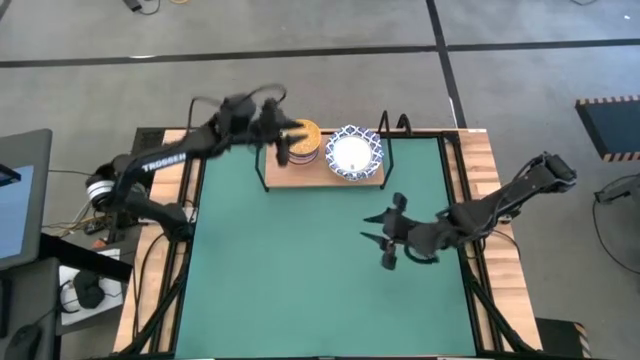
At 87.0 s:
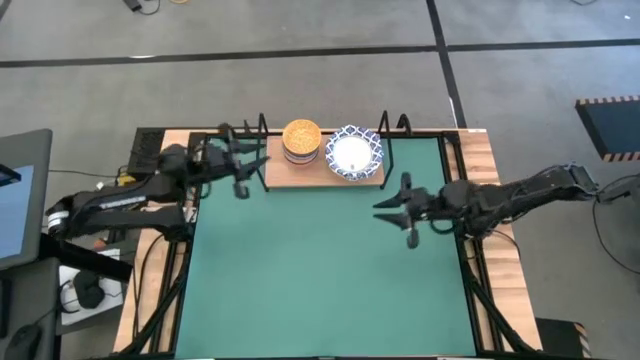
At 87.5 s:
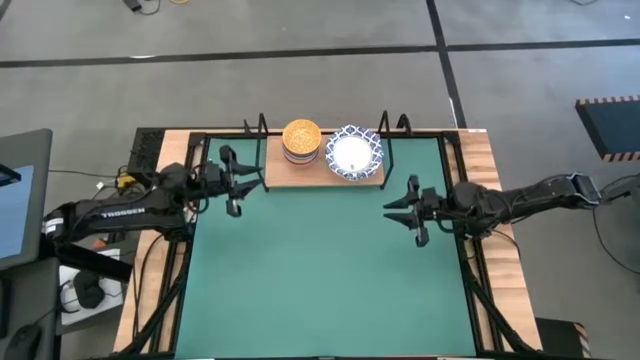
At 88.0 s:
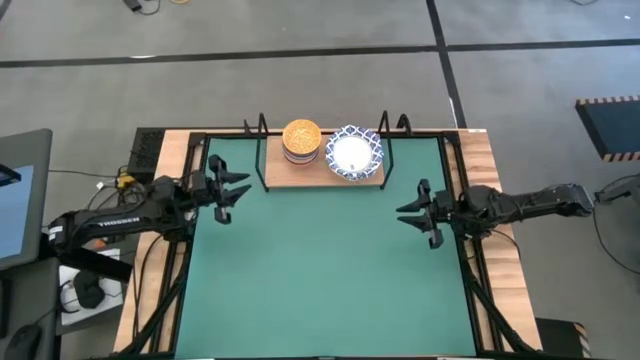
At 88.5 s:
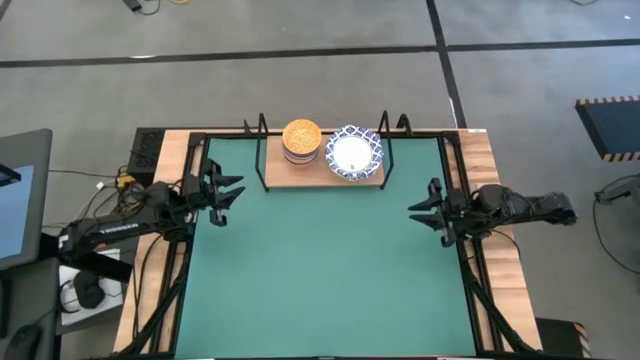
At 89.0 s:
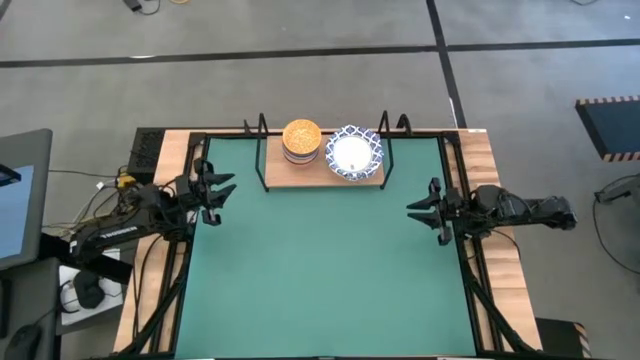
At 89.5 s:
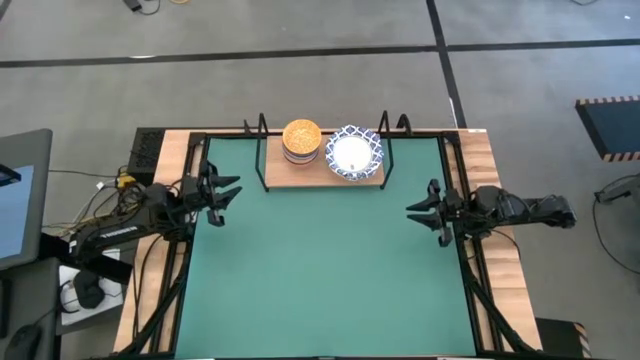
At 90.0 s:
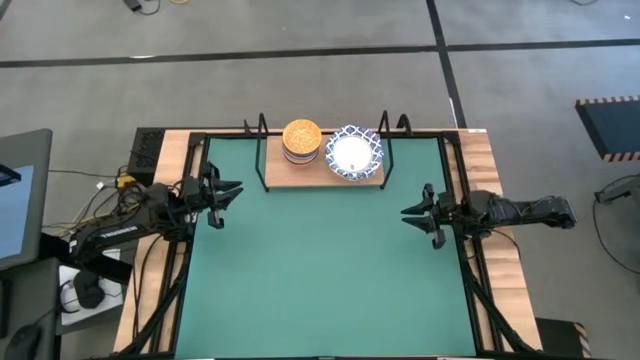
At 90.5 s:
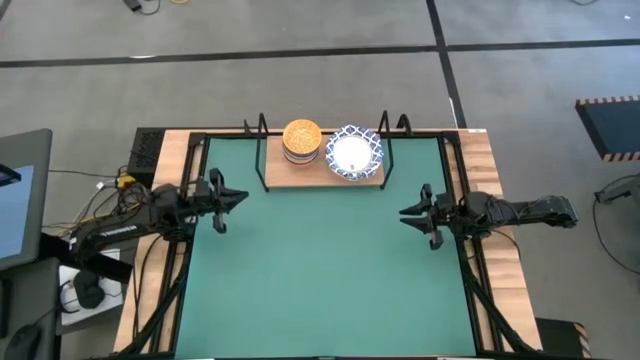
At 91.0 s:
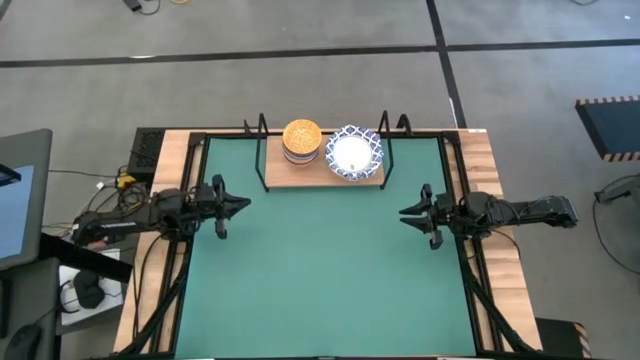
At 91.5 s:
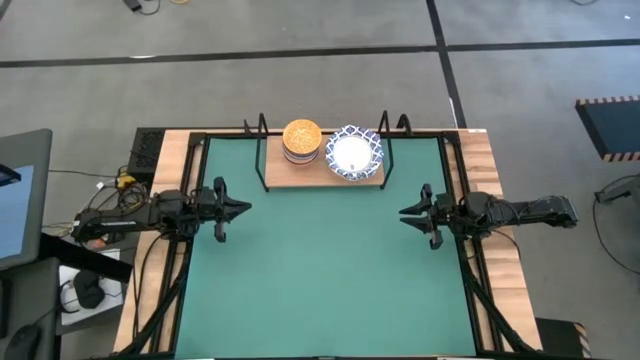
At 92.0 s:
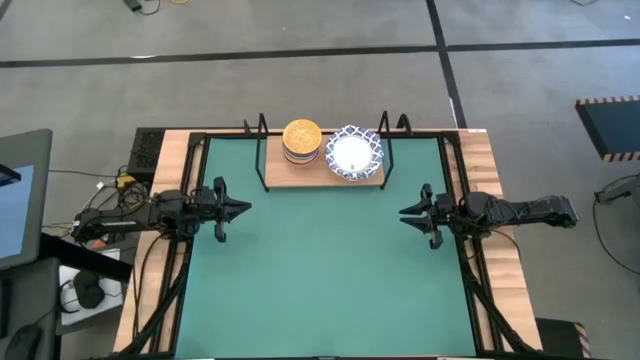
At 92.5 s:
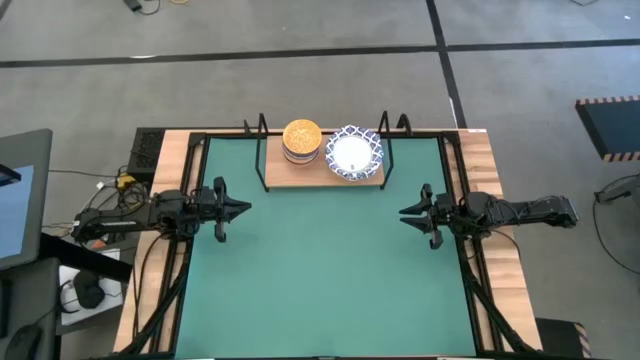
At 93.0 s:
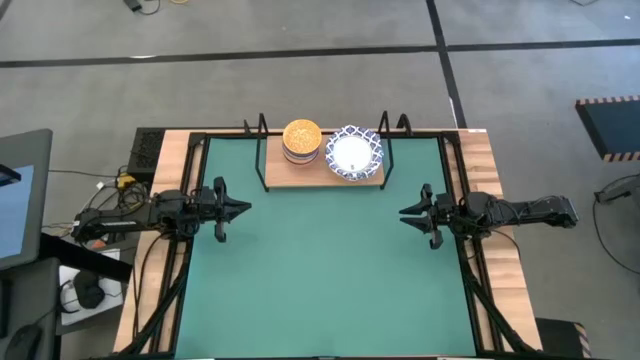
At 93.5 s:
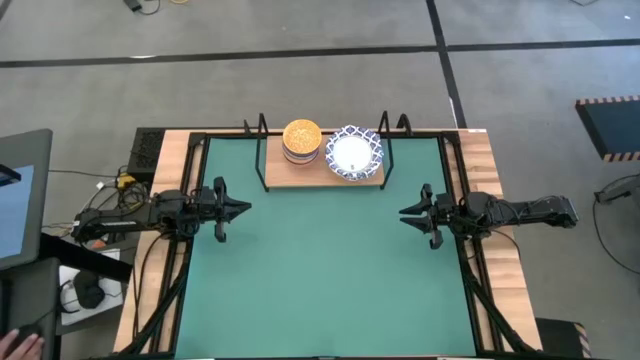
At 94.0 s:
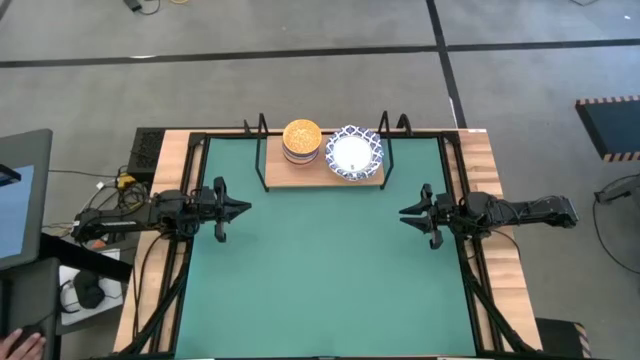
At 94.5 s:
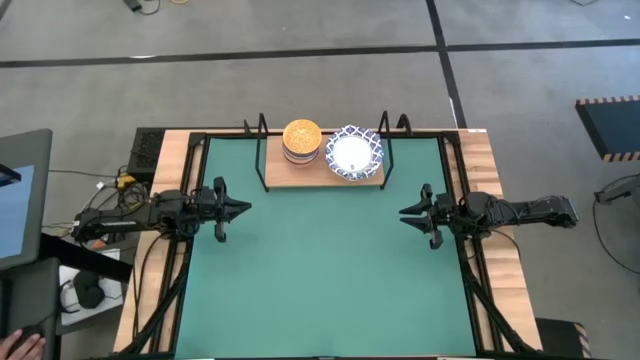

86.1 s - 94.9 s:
Task: Place and stack bowls onto a shelf
Return to Home Position

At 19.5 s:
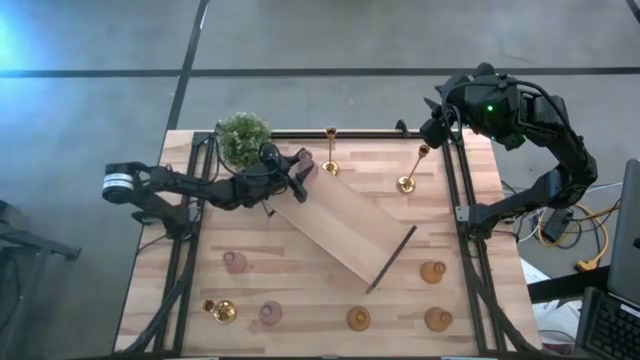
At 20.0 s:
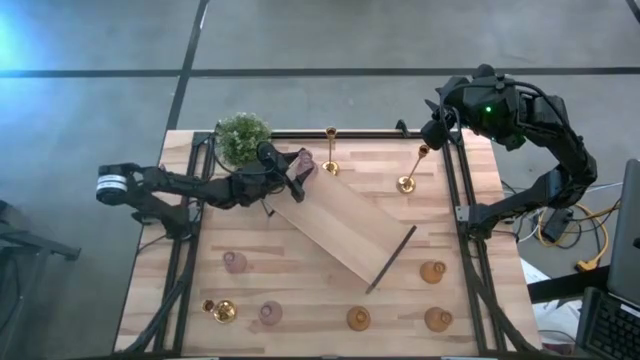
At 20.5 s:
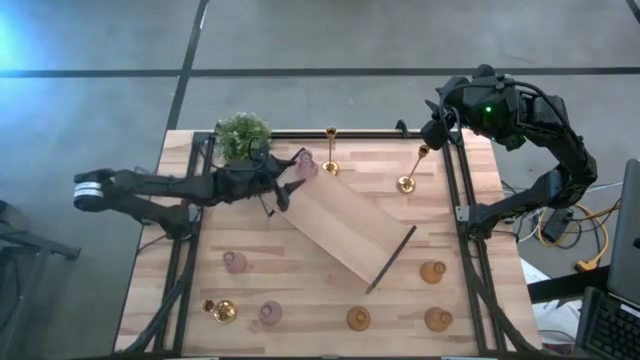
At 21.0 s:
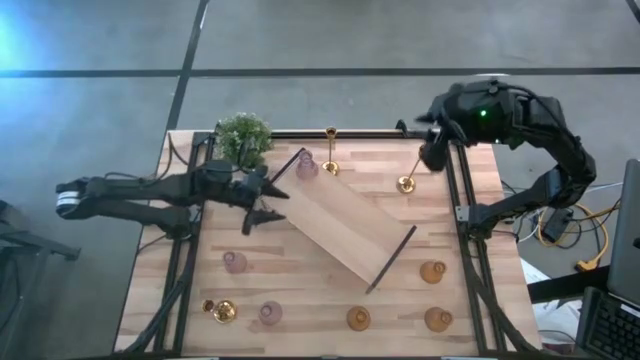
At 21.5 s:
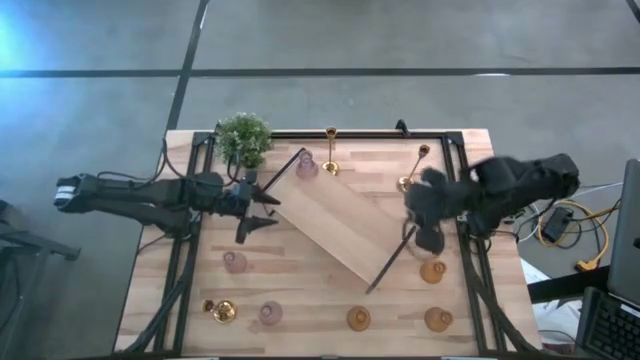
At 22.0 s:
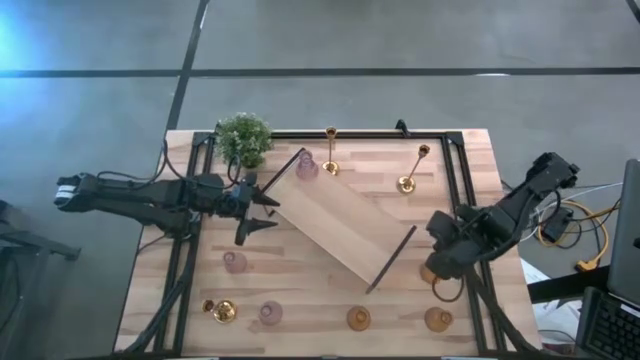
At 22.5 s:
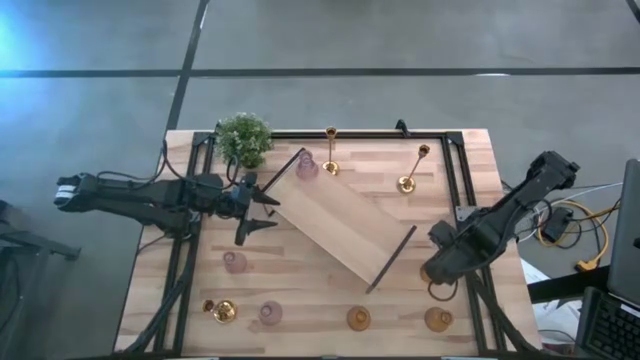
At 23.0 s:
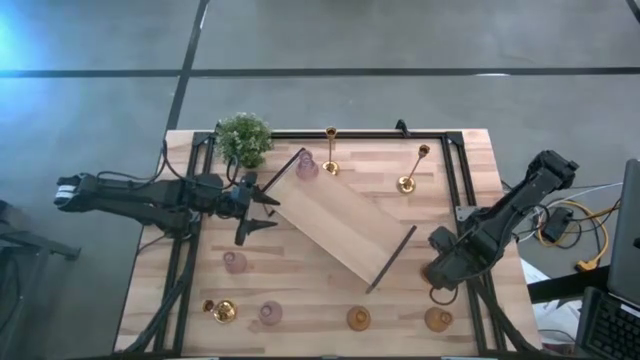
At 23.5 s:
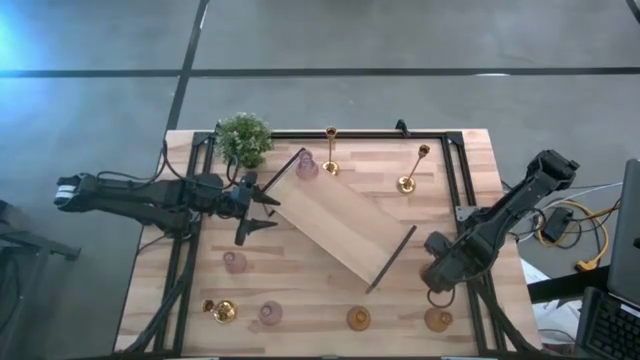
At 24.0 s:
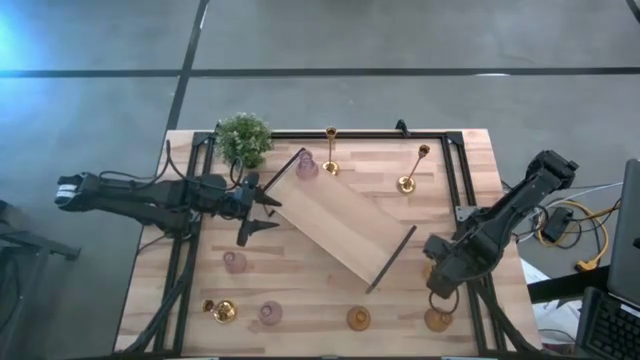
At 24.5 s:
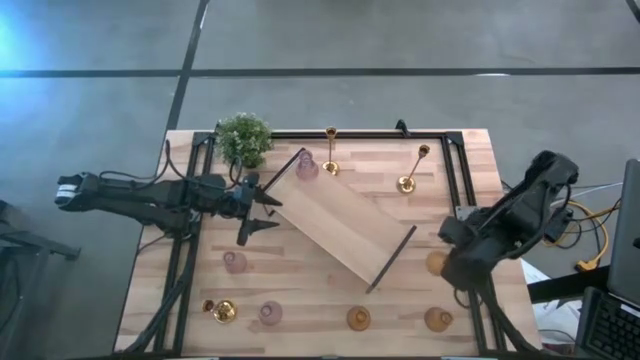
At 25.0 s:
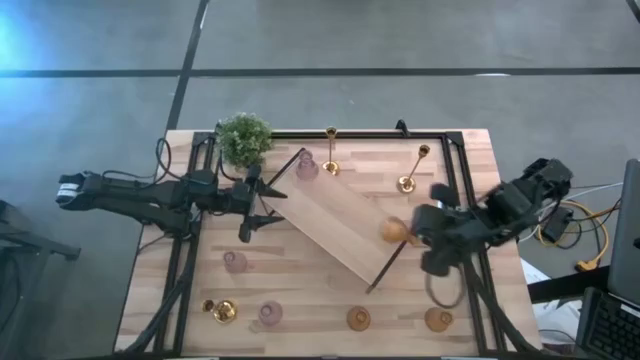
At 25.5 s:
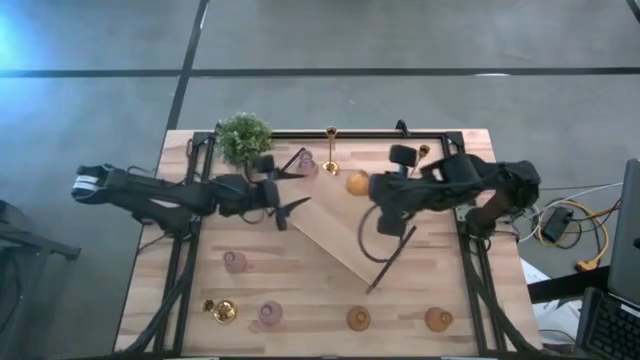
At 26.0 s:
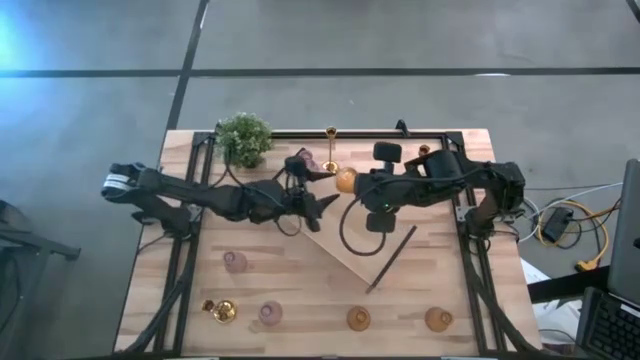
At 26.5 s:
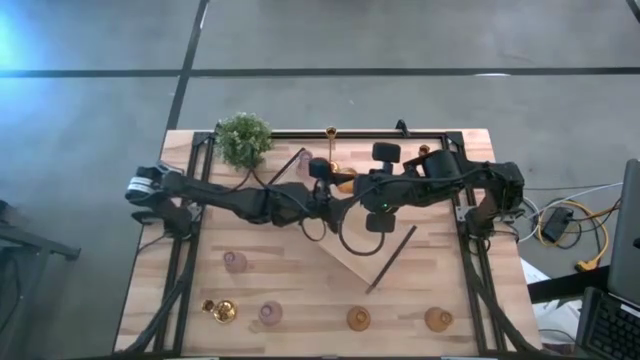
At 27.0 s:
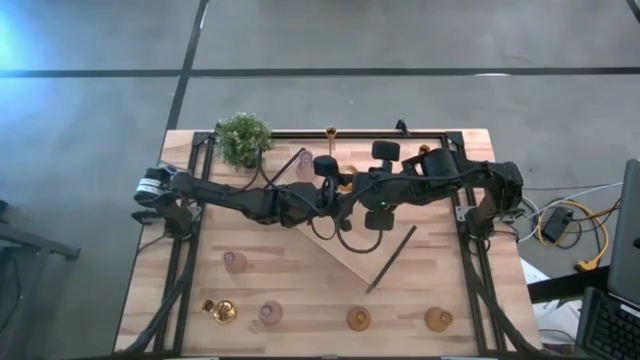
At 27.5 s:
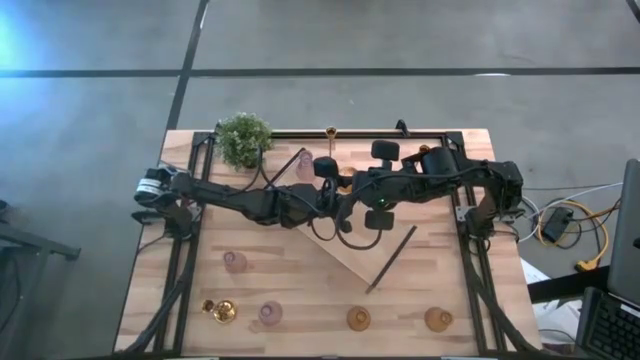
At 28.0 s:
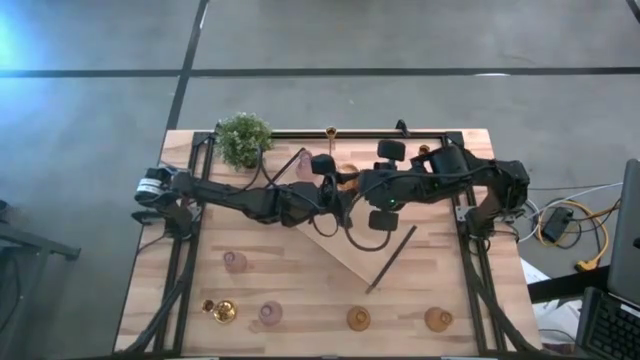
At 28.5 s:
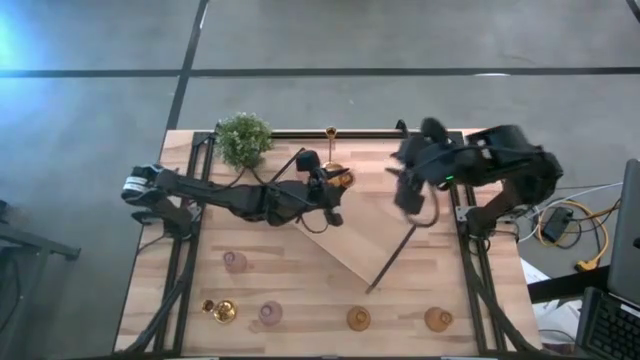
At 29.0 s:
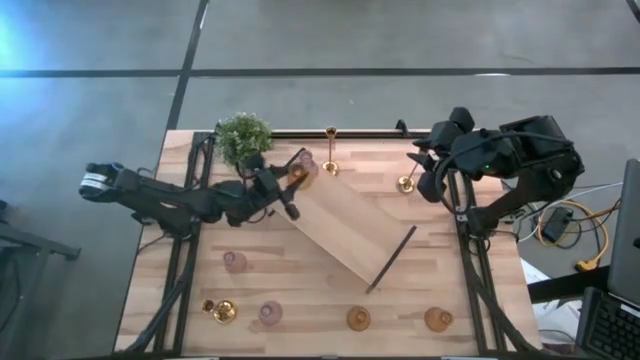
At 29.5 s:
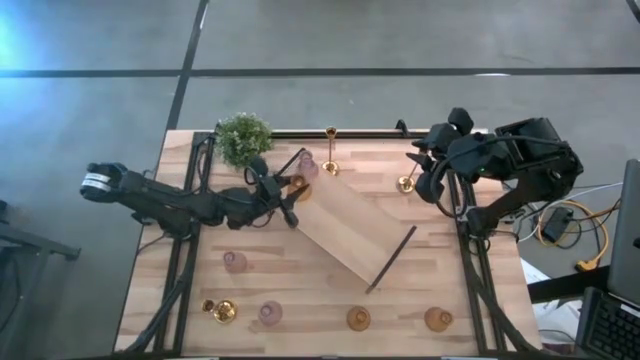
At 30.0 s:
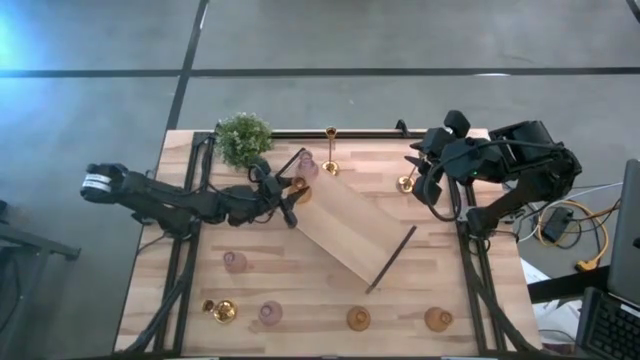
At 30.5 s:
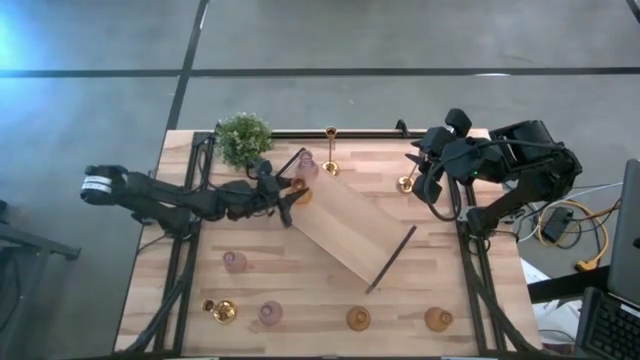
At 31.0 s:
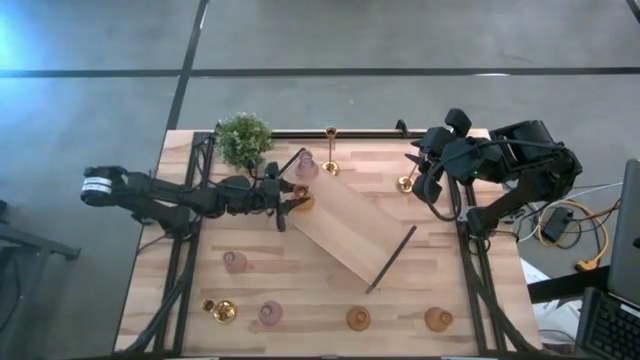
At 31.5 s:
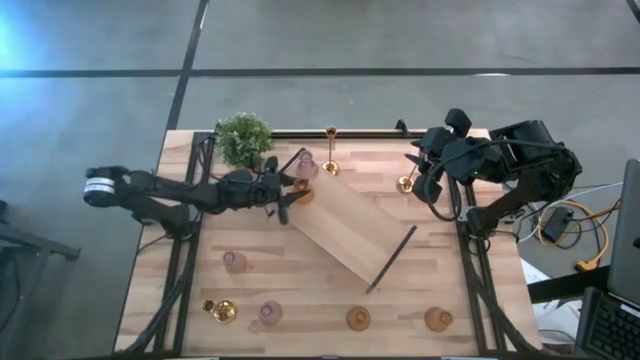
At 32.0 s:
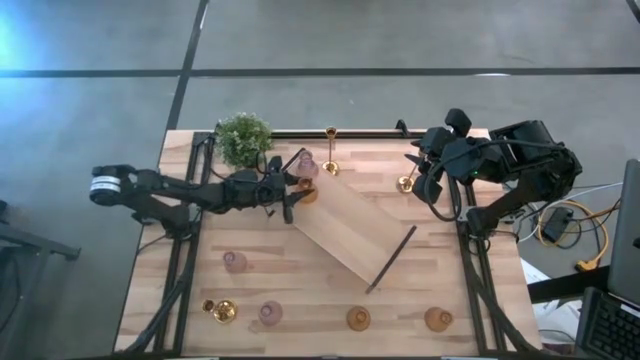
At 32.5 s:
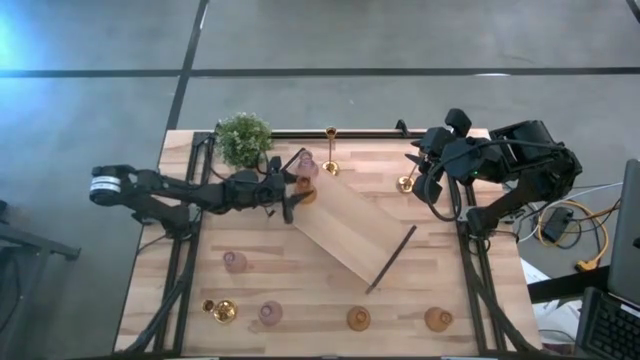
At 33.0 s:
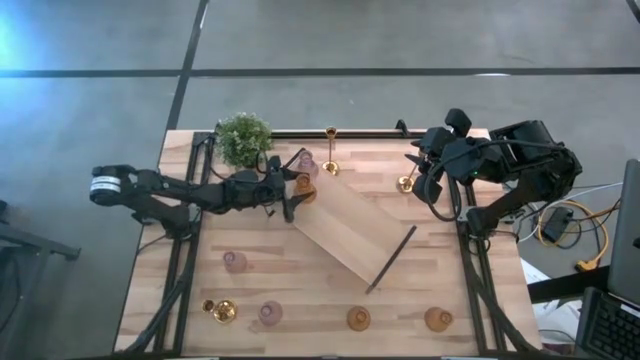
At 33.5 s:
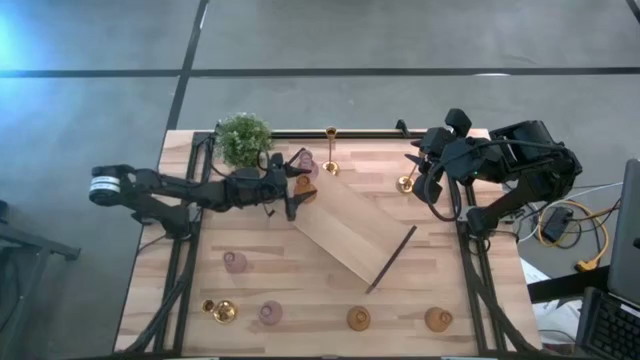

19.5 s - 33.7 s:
Task: Pick & Place candle stick holders
Put the top yellow candle holder on the shelf
